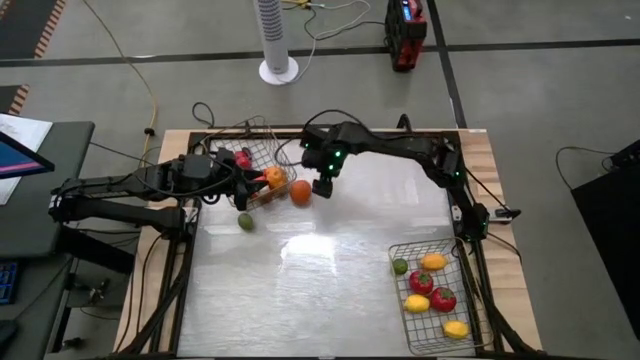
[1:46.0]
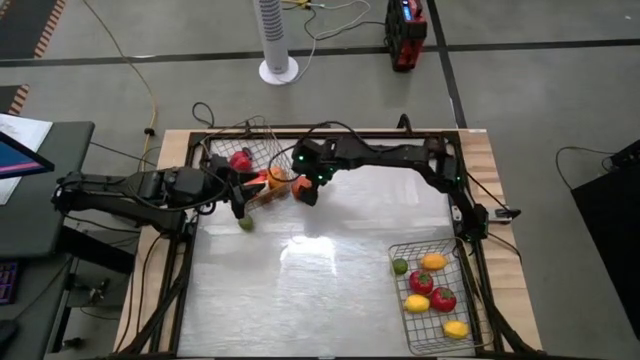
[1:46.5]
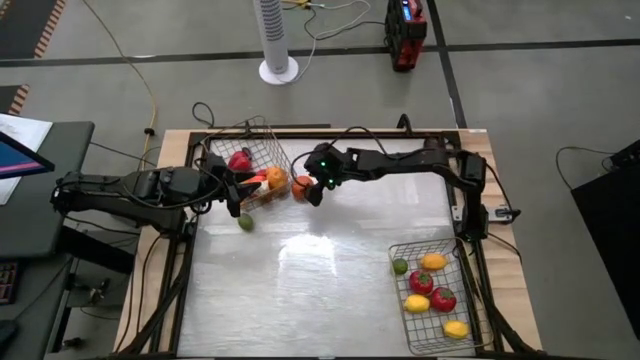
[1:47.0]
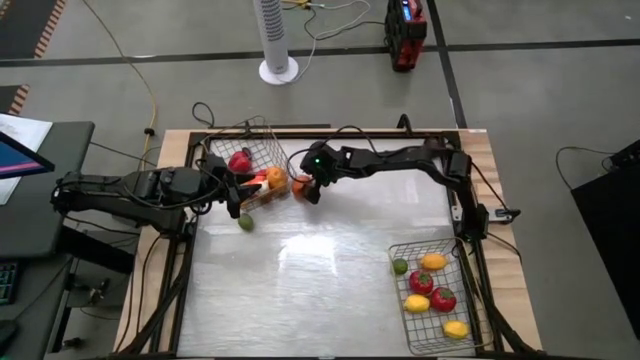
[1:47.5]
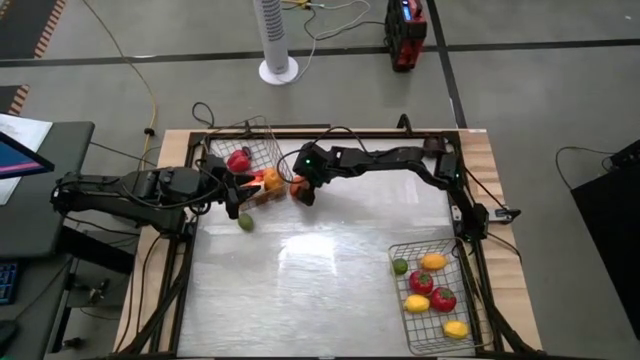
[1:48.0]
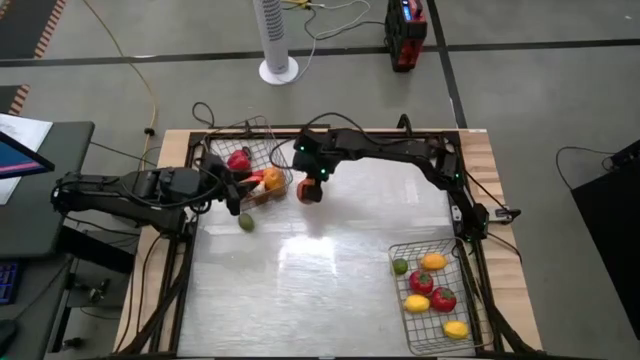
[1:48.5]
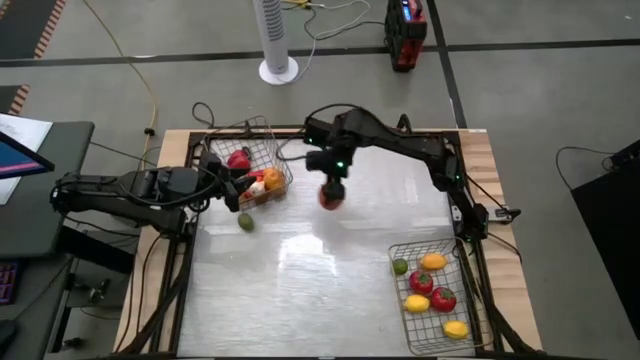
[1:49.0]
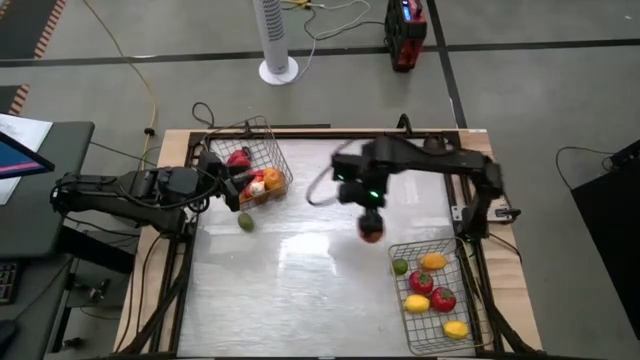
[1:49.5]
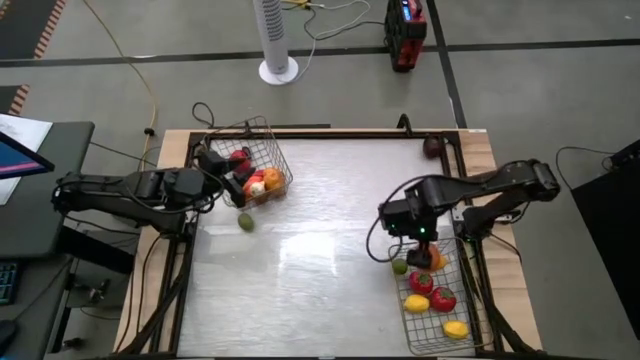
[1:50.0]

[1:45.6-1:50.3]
Task: Sort produce into baskets
Put the orange into the bottom wire basket

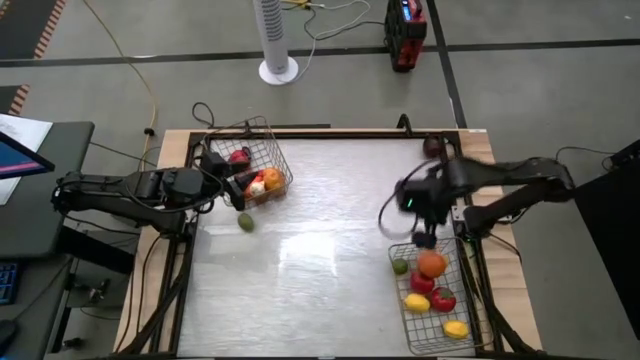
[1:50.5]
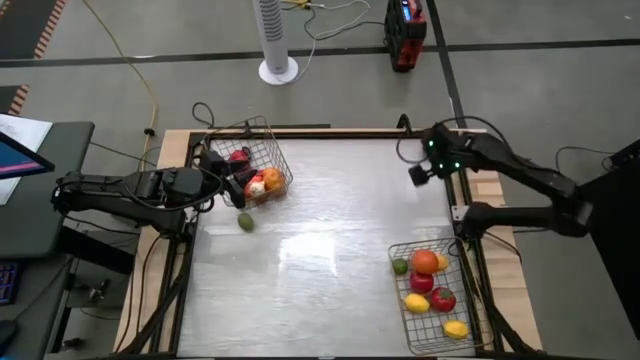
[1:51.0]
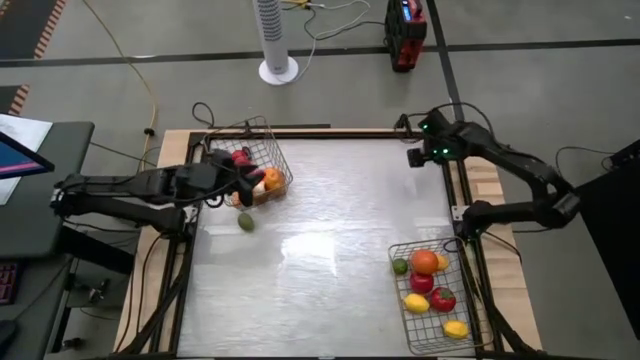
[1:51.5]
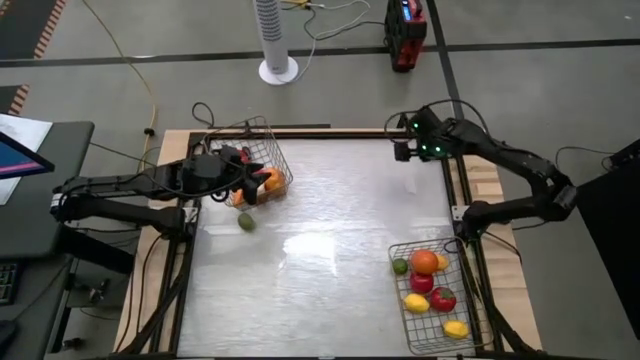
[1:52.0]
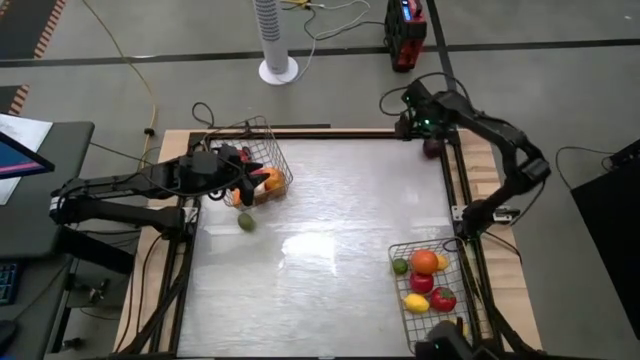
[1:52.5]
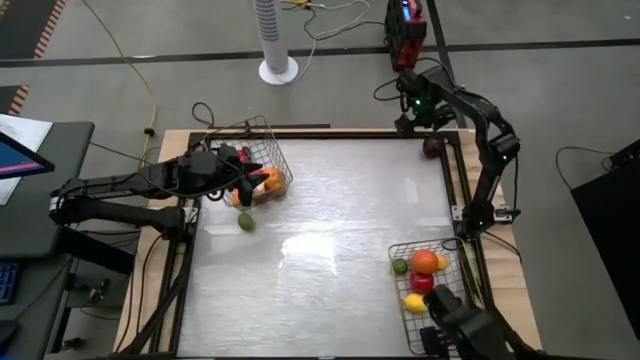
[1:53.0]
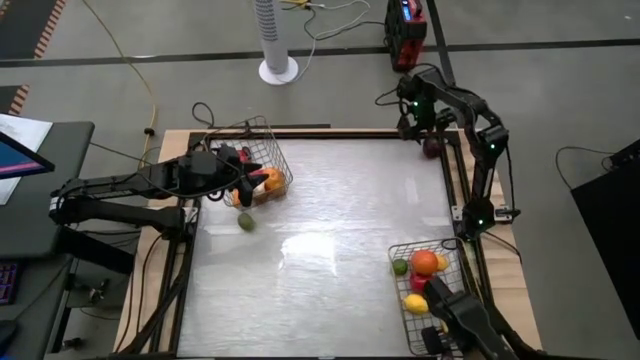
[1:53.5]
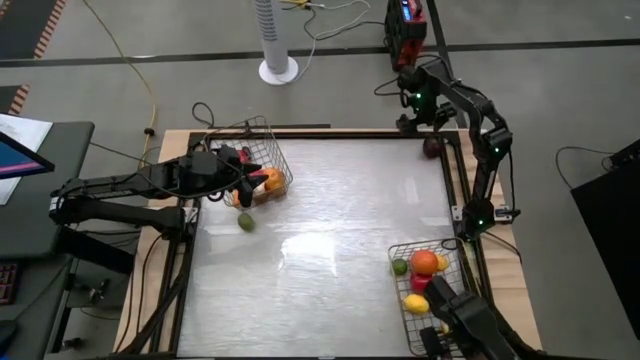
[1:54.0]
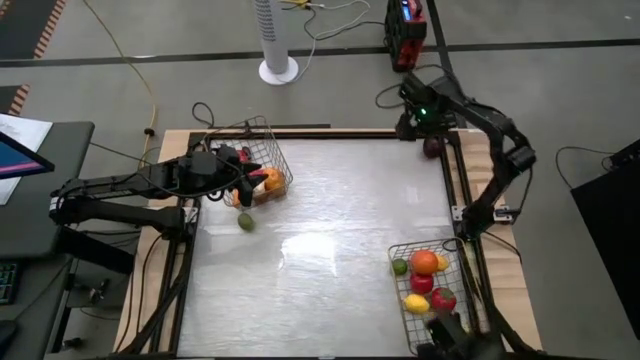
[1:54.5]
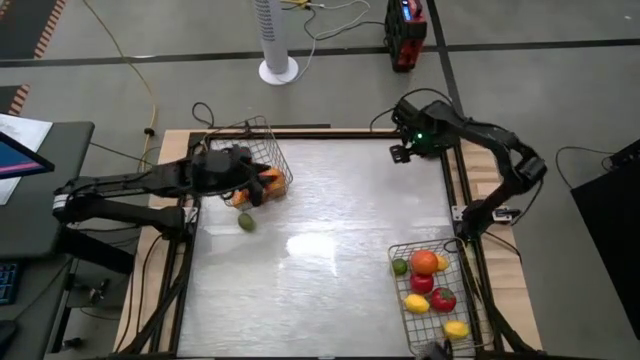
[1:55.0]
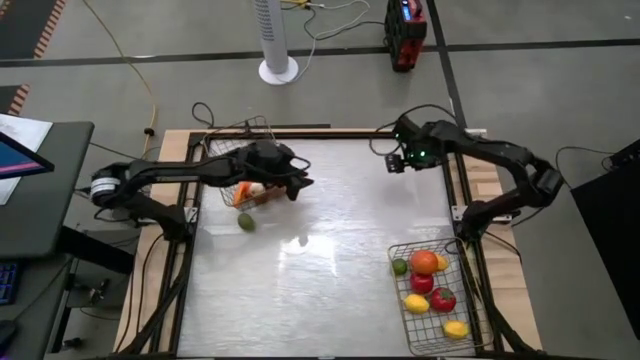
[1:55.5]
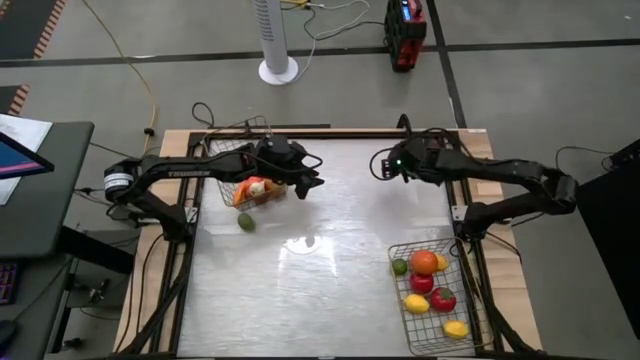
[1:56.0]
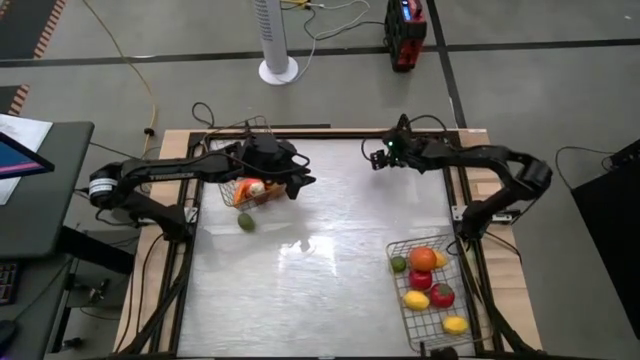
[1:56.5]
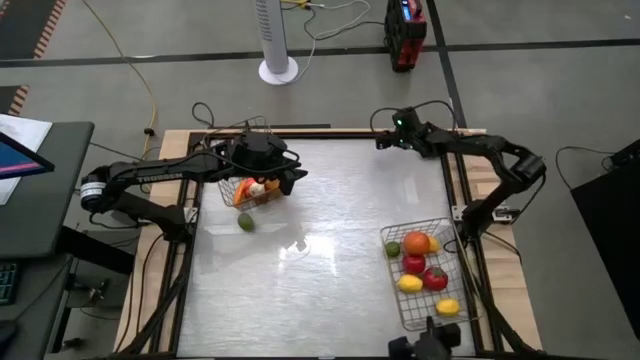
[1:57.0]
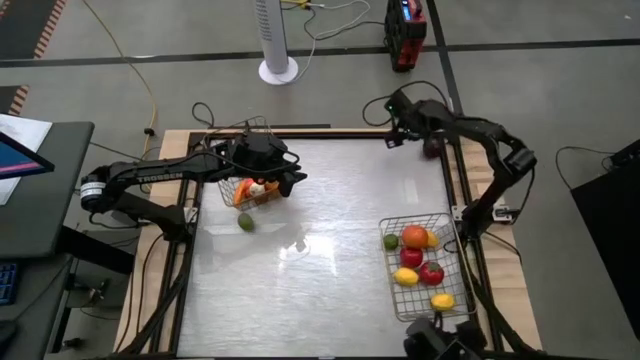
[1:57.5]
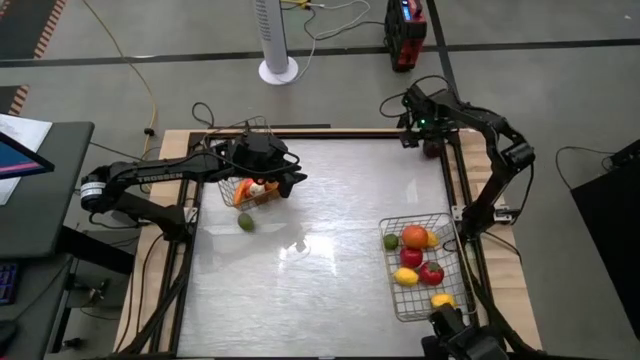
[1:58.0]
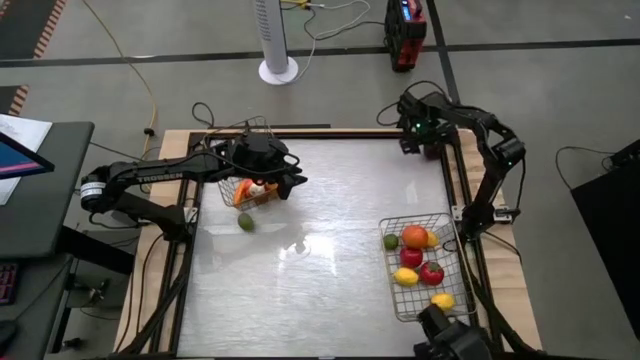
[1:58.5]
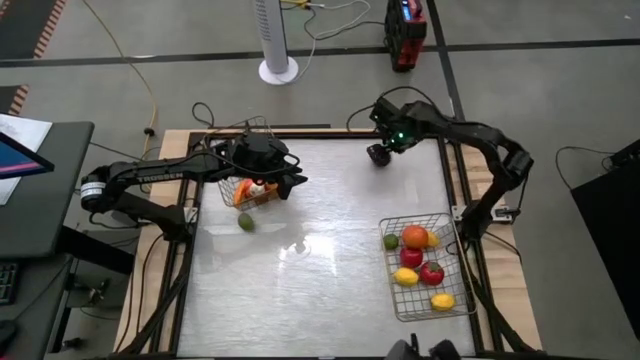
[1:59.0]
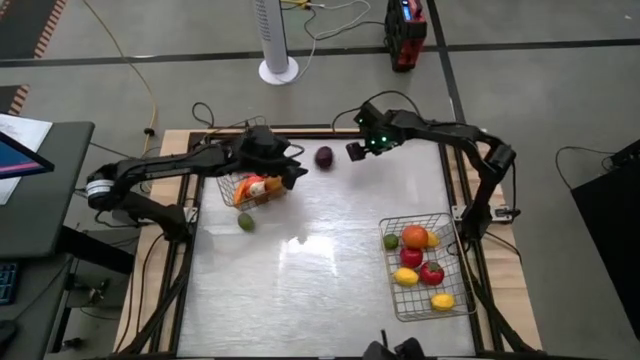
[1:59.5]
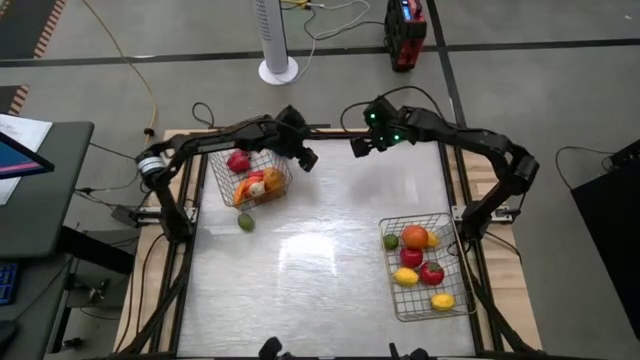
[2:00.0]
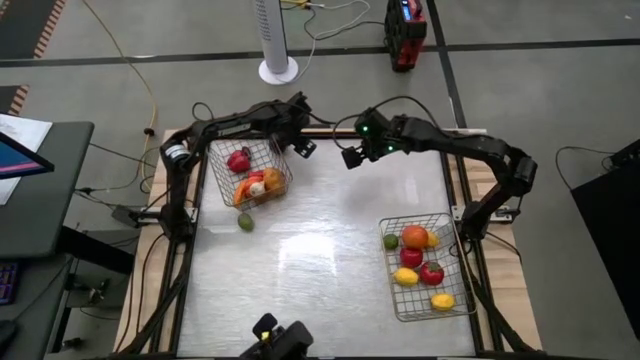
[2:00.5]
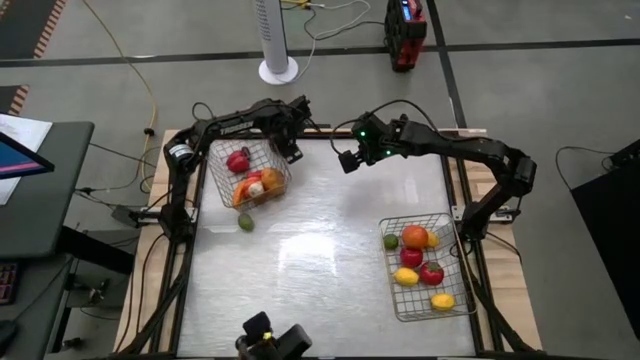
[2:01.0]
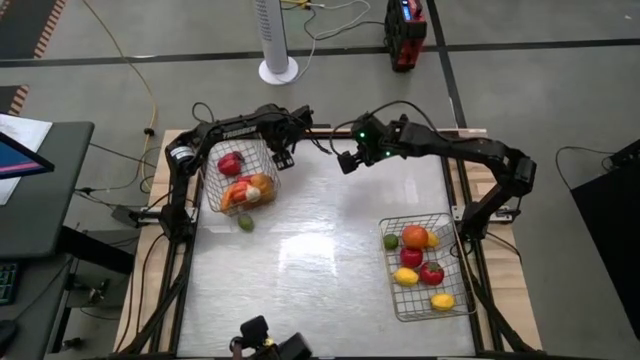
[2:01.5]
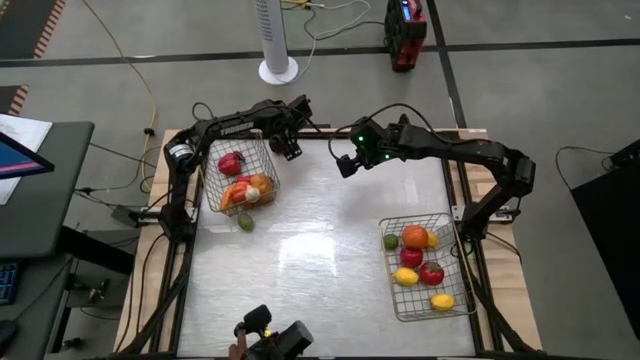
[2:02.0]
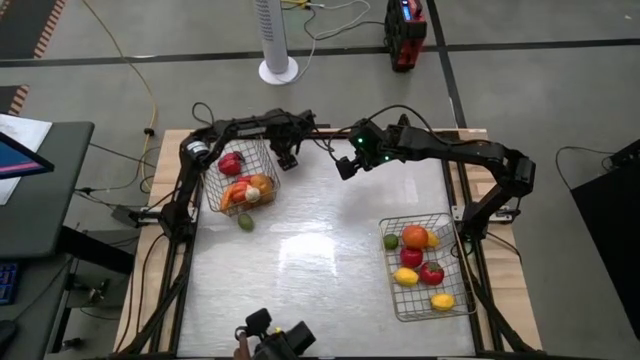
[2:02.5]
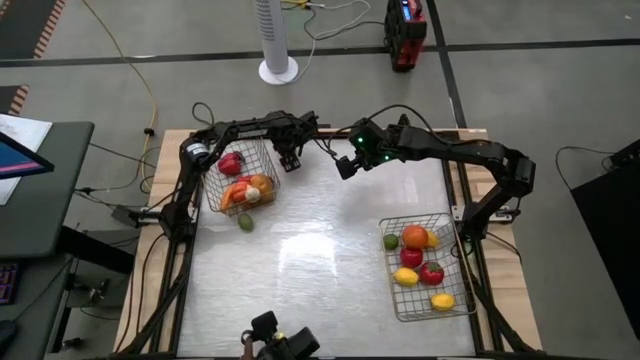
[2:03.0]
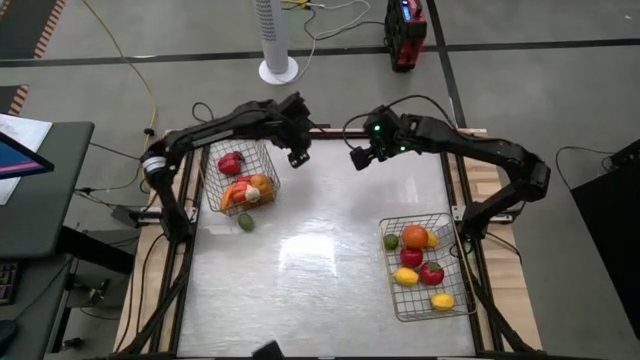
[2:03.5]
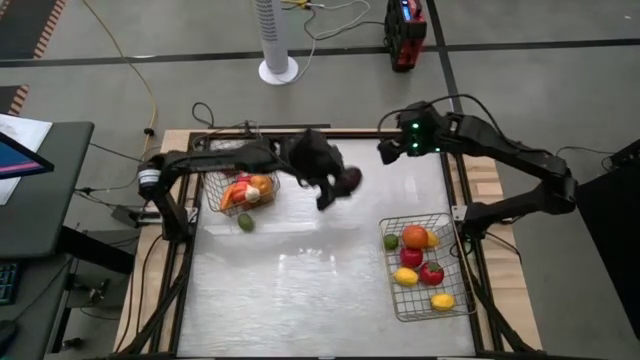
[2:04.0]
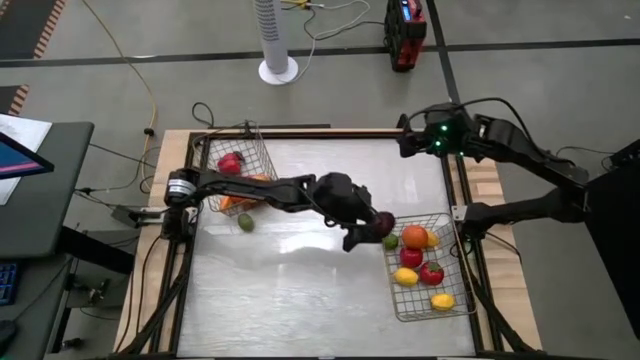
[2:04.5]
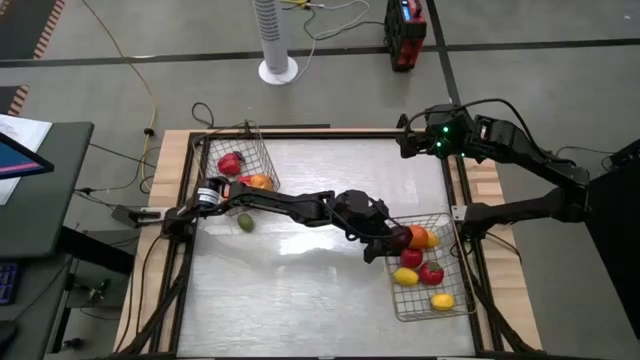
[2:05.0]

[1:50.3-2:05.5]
Put the apple into the bottom wire basket

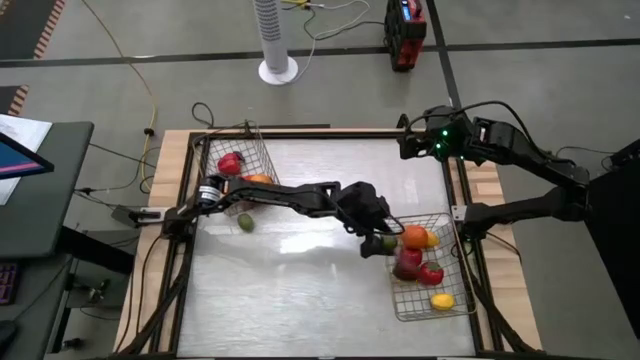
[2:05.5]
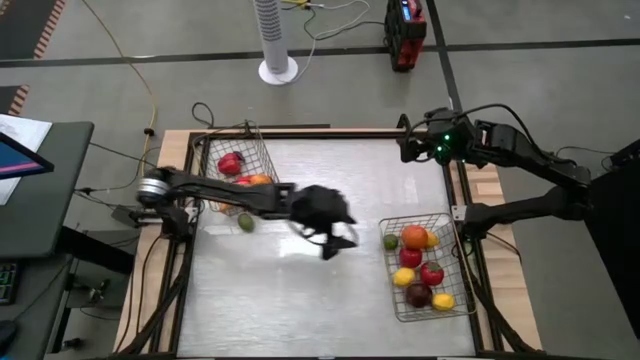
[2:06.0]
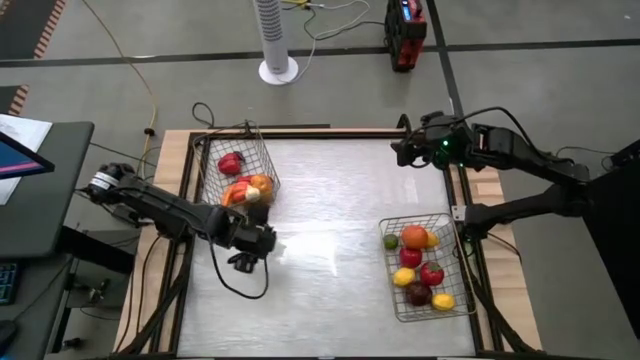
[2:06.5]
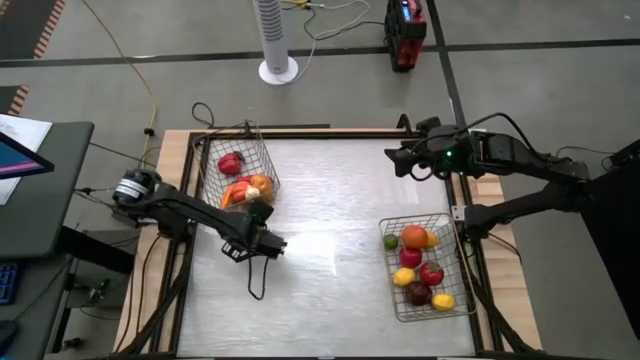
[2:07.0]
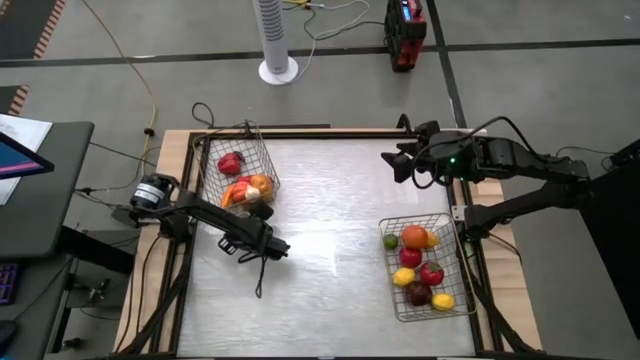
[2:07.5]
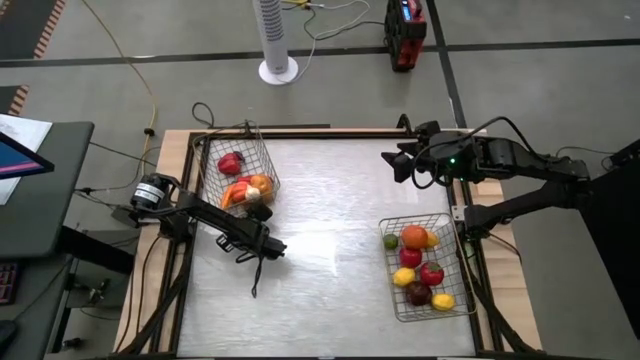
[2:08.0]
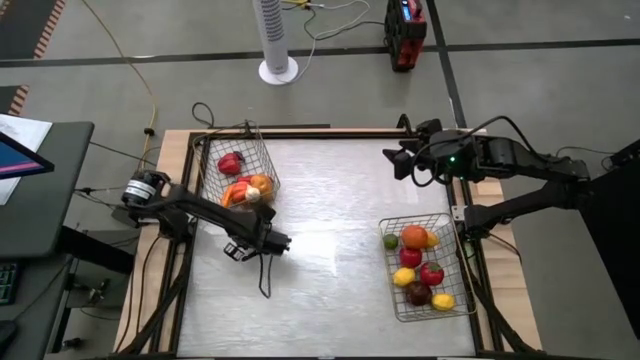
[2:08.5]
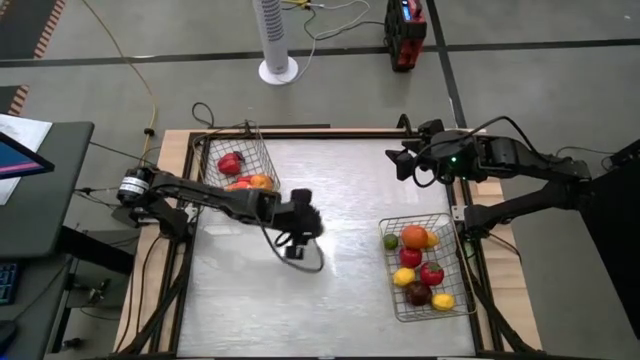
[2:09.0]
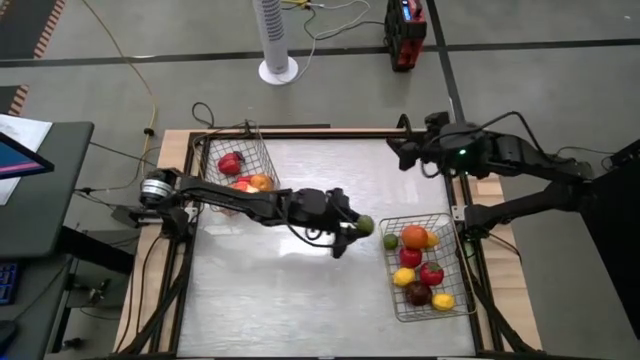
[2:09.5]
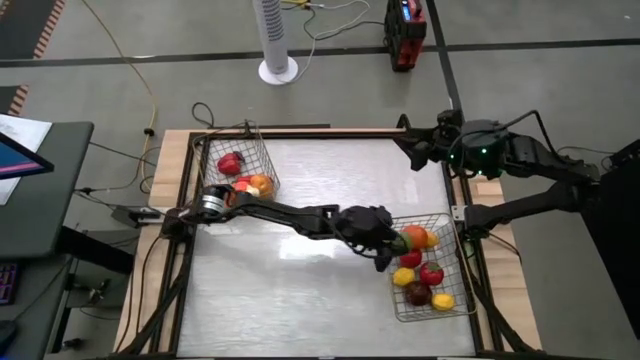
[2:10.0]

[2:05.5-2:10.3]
Put the lime into the bottom wire basket
